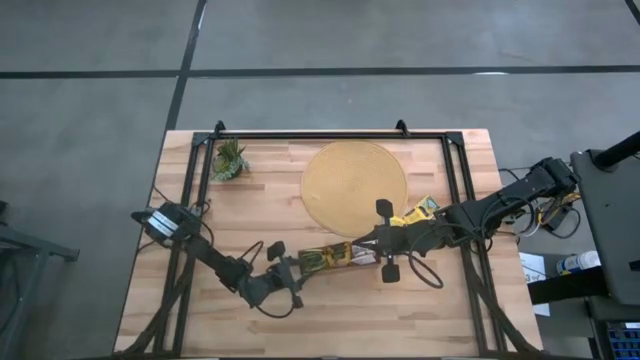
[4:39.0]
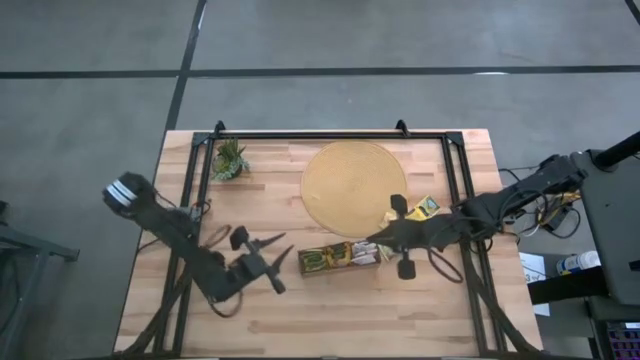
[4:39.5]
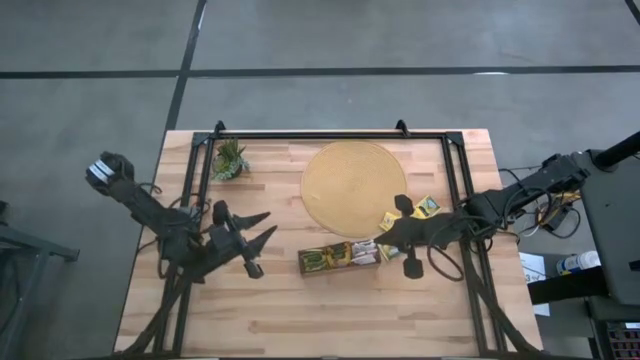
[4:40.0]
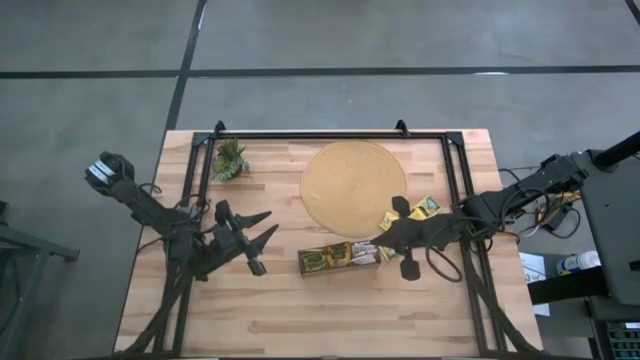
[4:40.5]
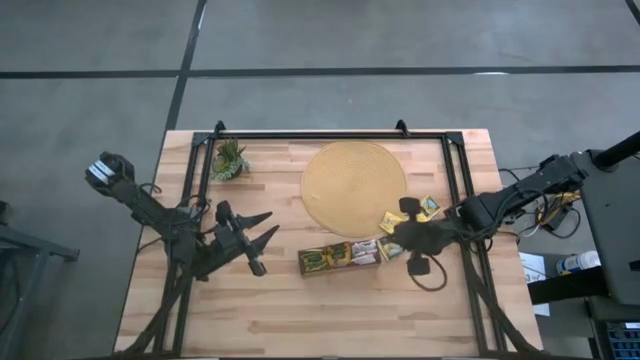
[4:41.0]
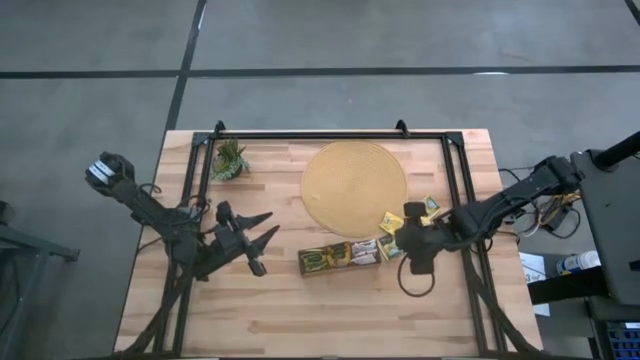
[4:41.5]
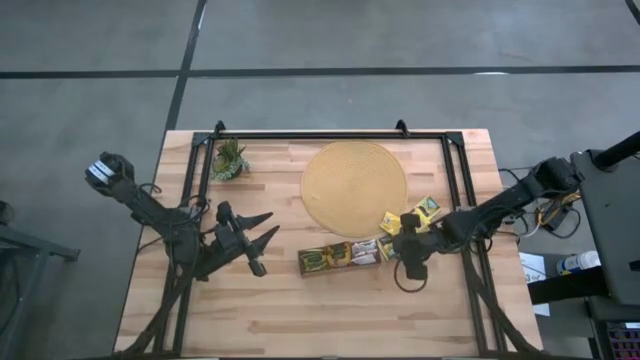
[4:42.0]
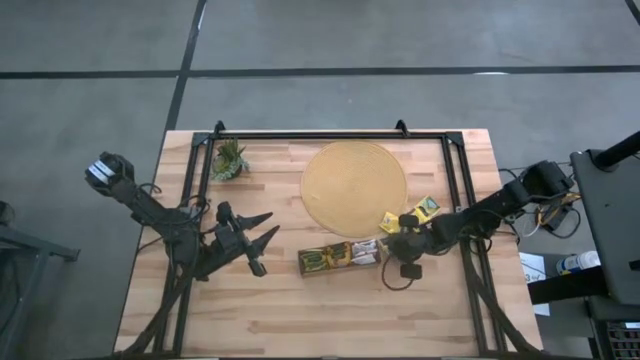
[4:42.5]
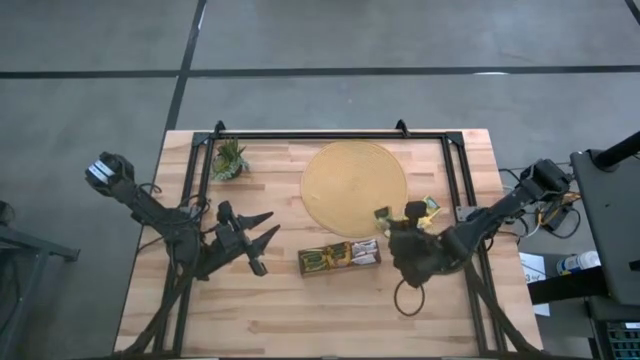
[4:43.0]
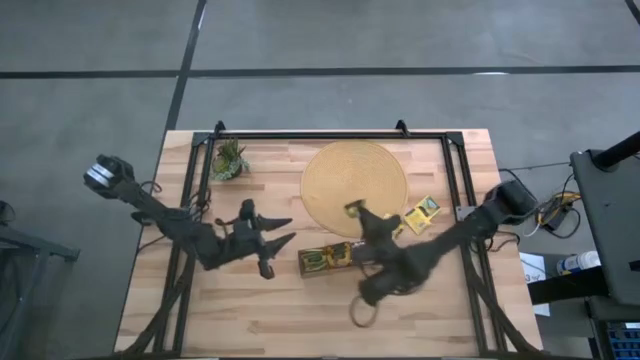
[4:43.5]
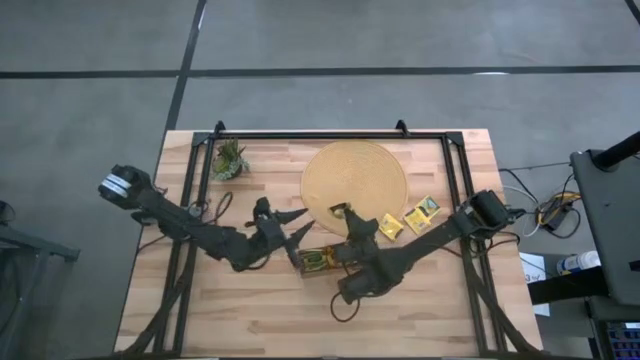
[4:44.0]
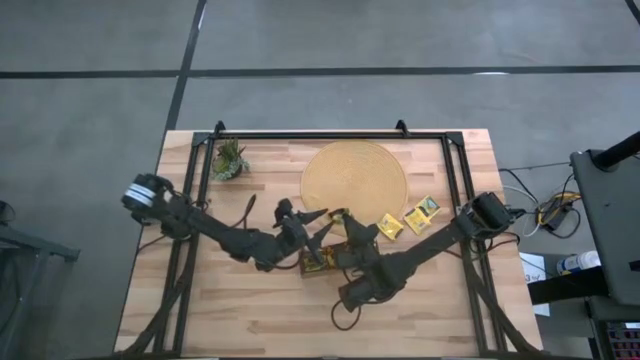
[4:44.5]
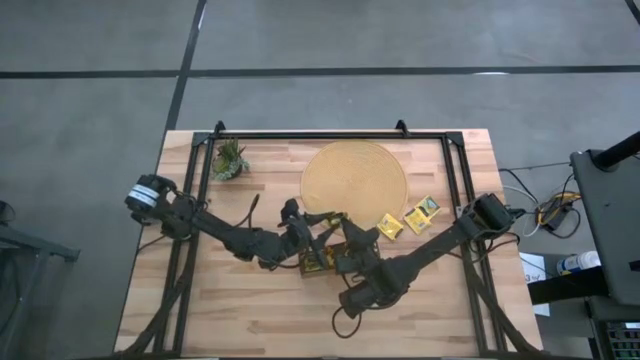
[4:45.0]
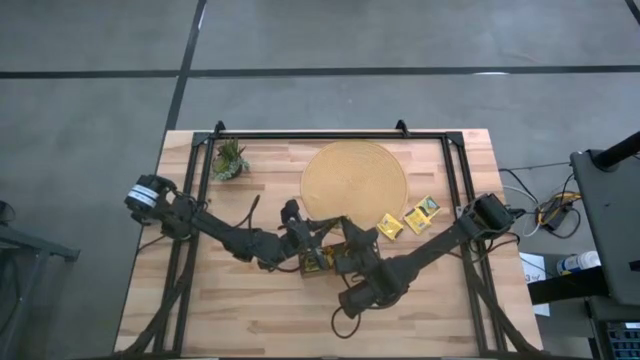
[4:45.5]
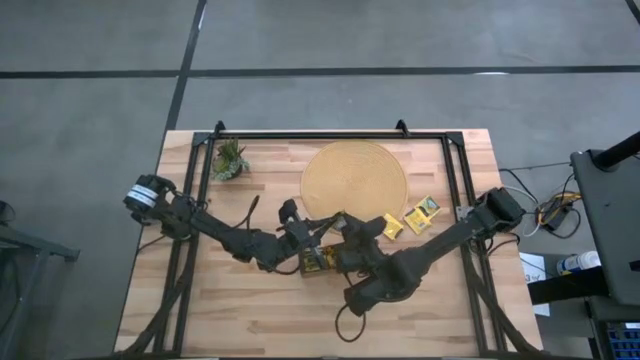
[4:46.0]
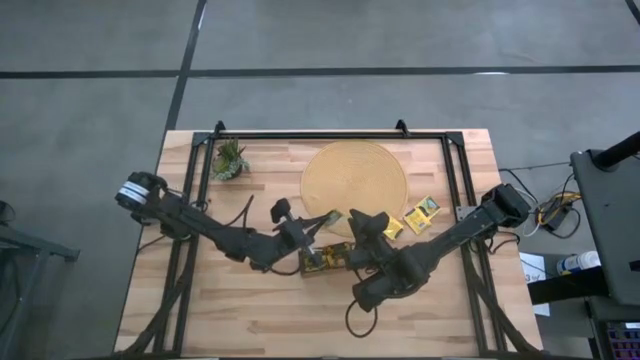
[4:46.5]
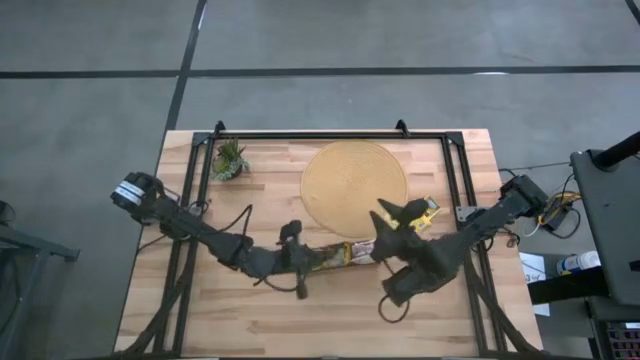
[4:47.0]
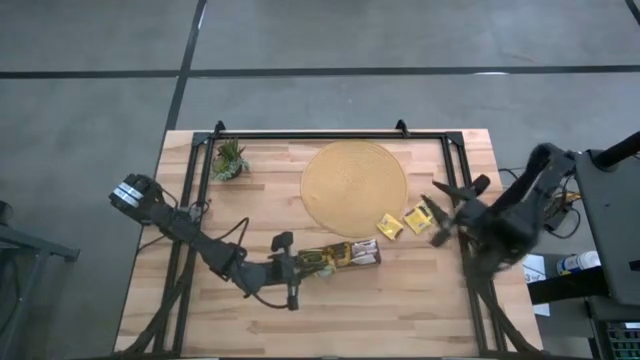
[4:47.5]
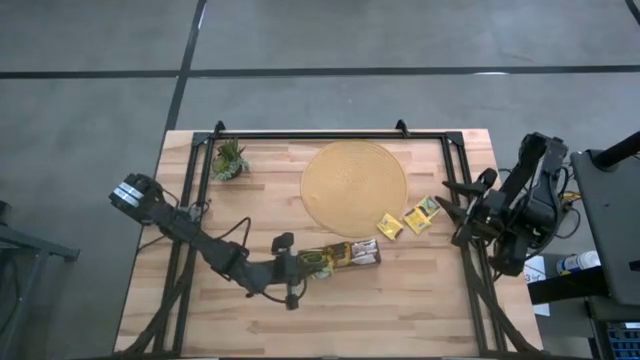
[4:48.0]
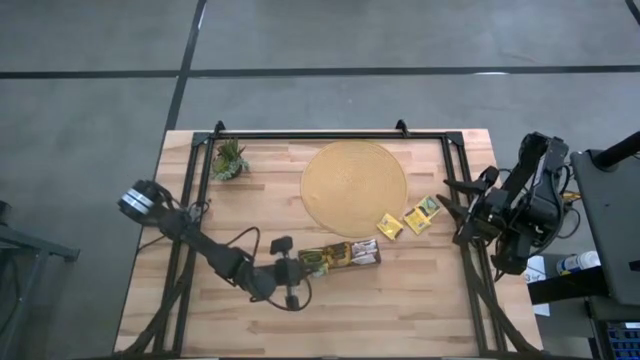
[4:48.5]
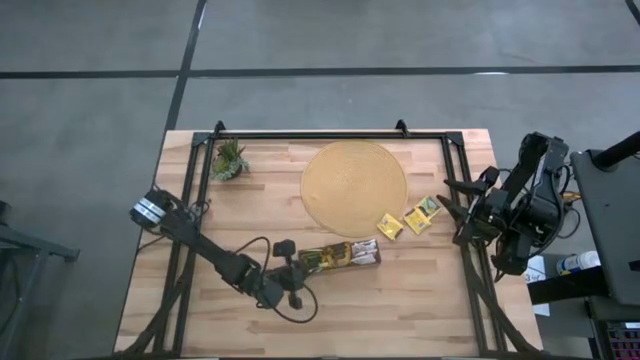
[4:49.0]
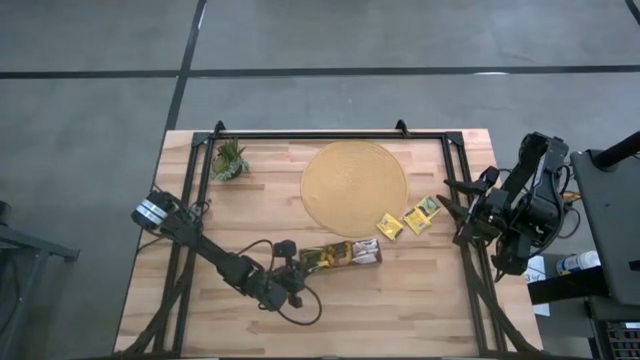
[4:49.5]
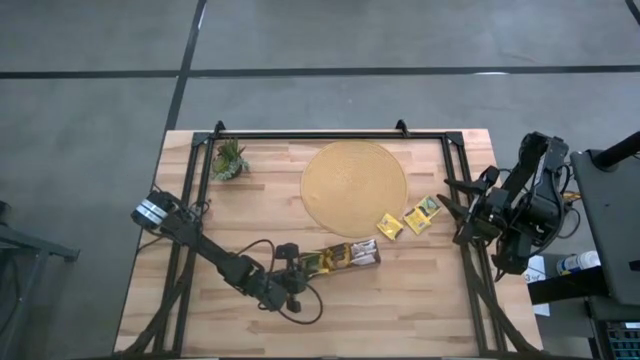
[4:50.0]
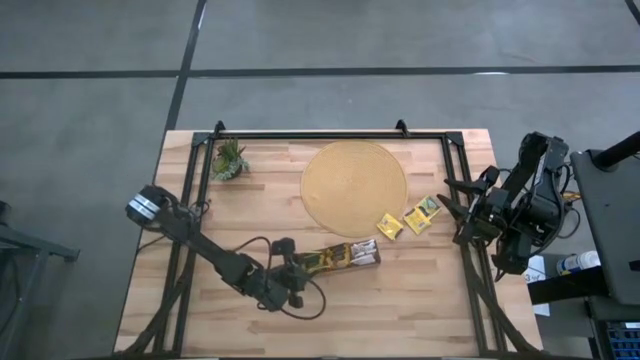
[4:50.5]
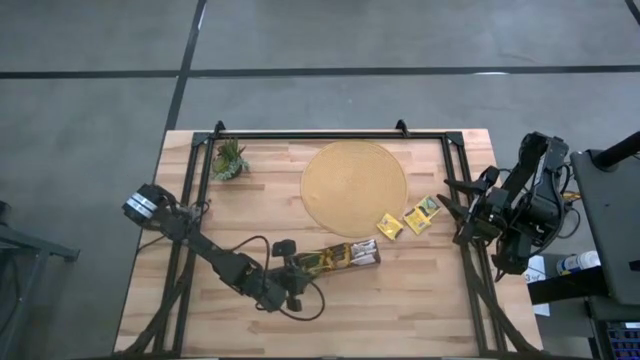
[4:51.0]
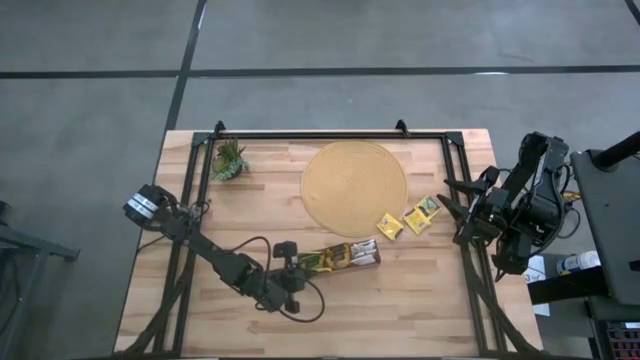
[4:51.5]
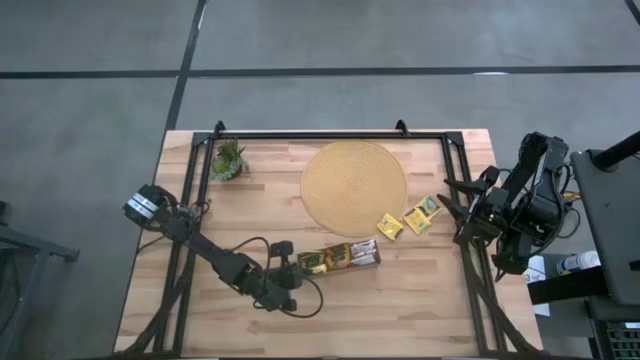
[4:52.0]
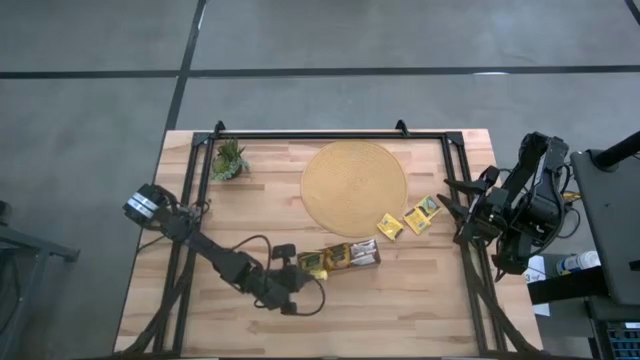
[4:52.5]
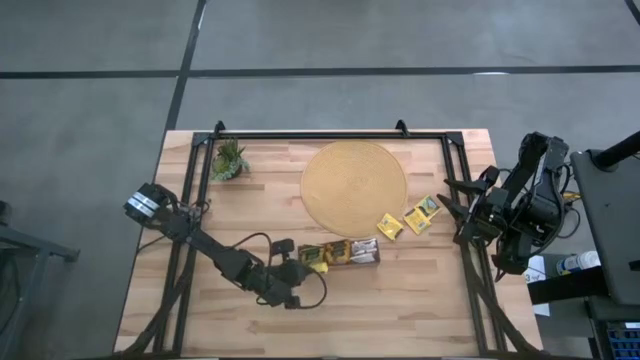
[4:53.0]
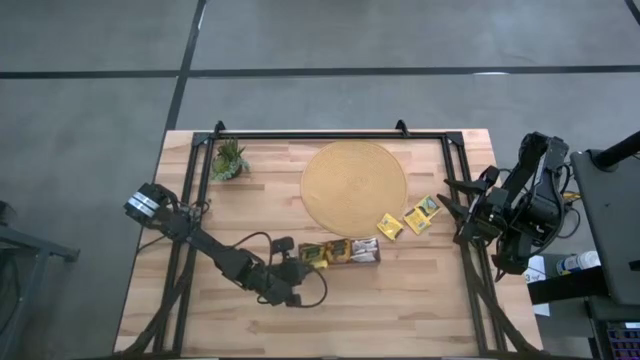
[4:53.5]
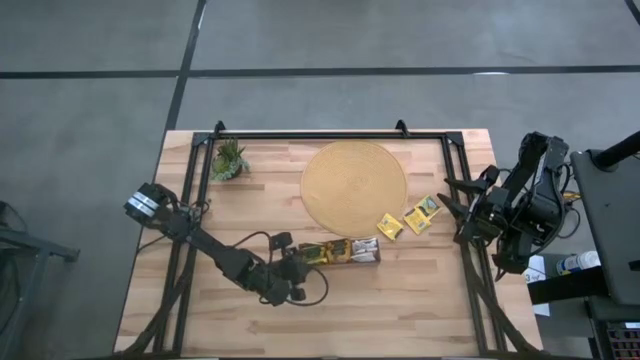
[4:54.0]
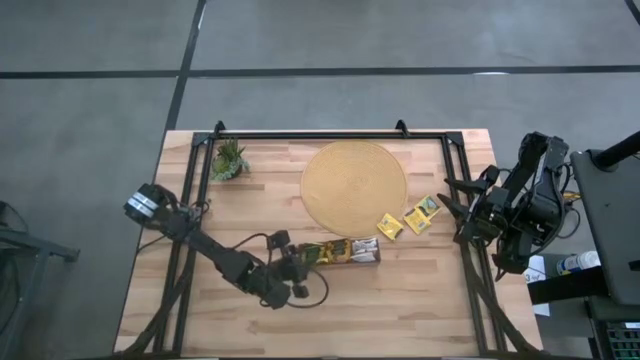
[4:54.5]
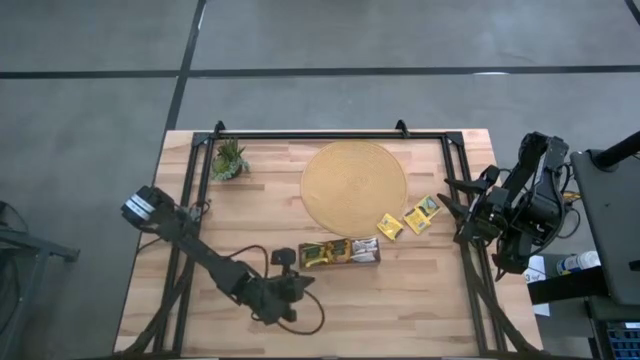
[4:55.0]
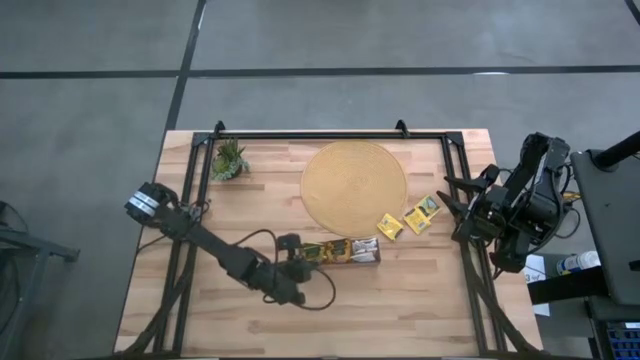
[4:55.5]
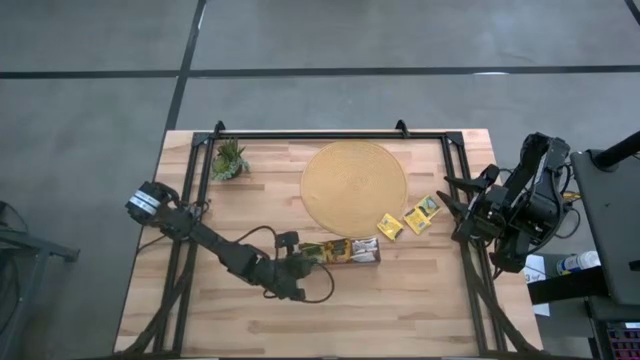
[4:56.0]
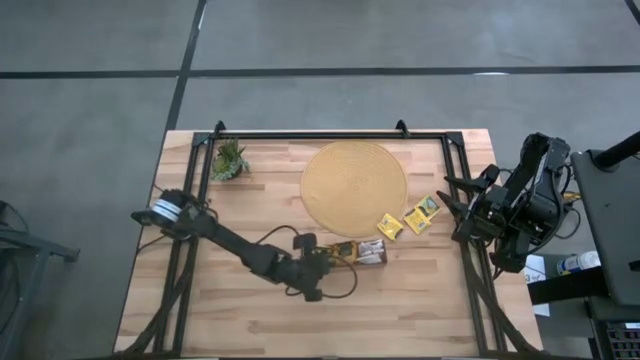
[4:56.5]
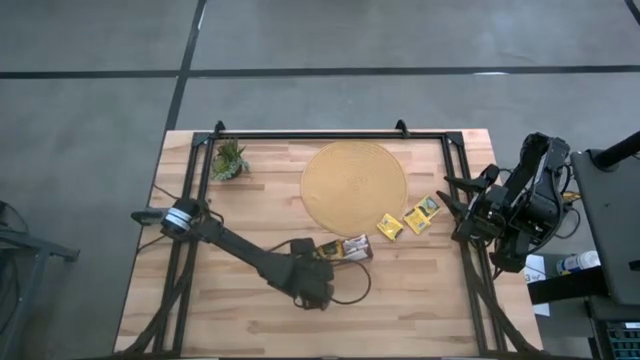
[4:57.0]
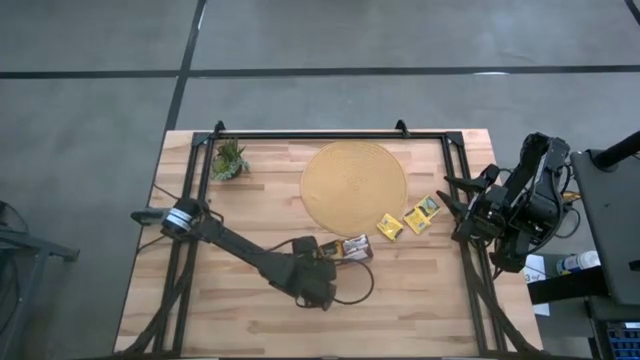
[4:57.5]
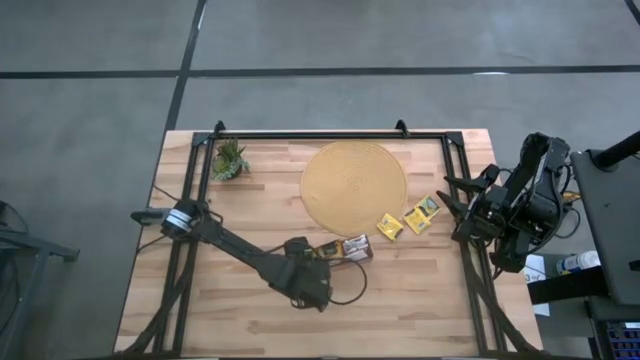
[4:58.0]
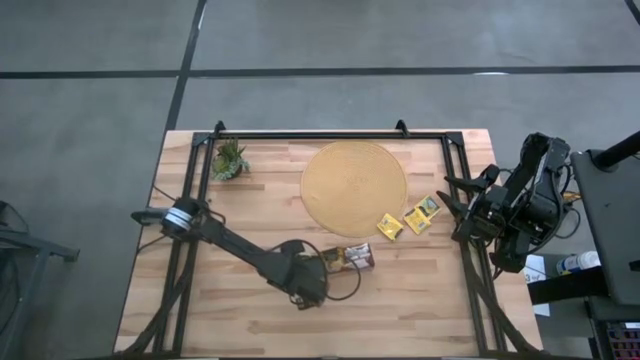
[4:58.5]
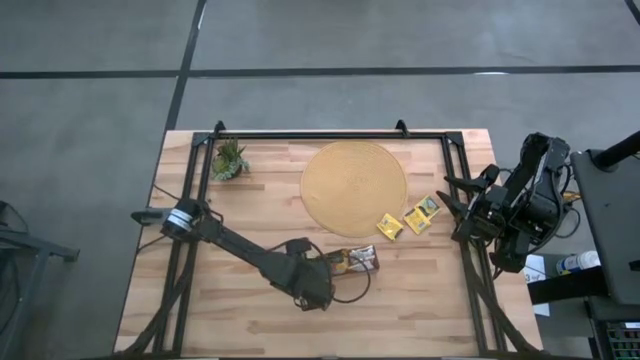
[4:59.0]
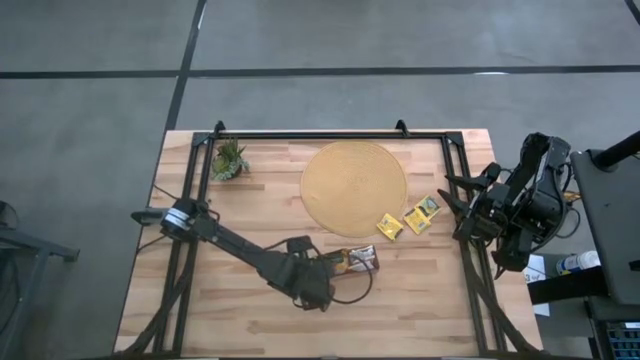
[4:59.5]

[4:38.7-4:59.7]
Task: Pick & Place Tea
Put the yellow tea bag into the left section of the wooden organizer
